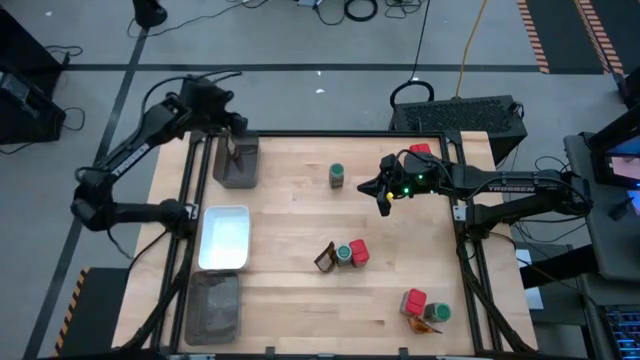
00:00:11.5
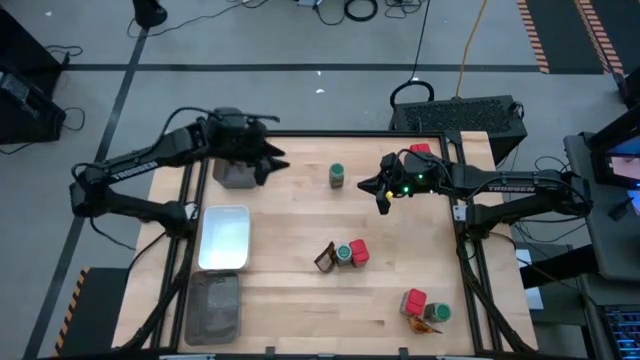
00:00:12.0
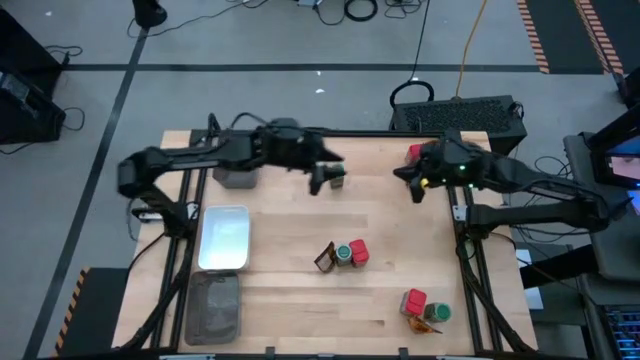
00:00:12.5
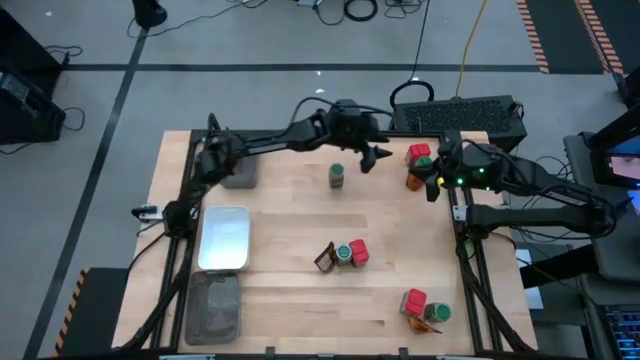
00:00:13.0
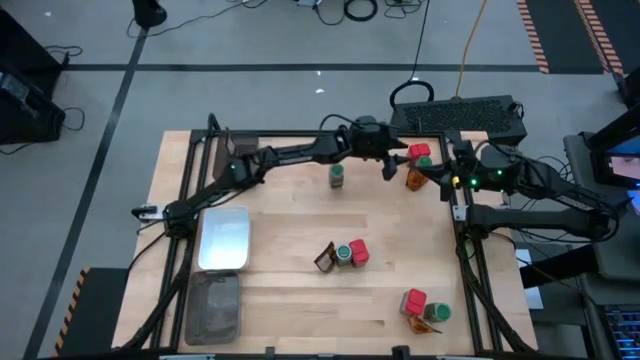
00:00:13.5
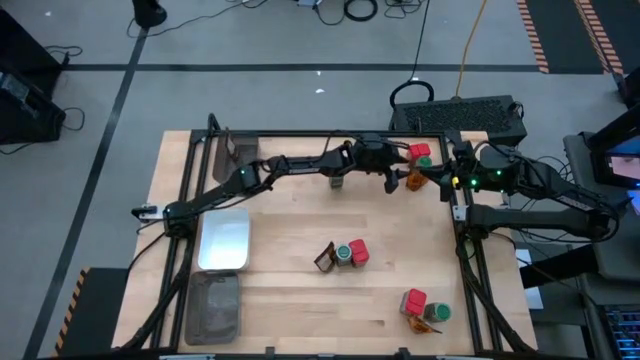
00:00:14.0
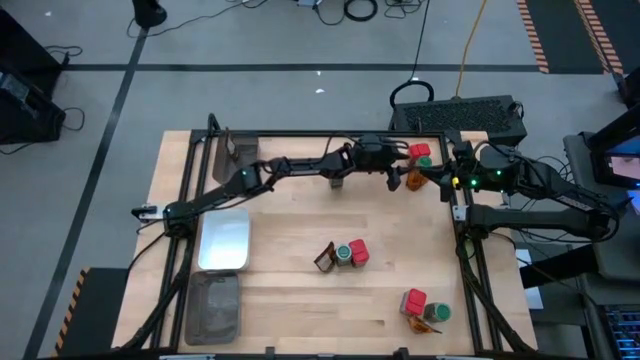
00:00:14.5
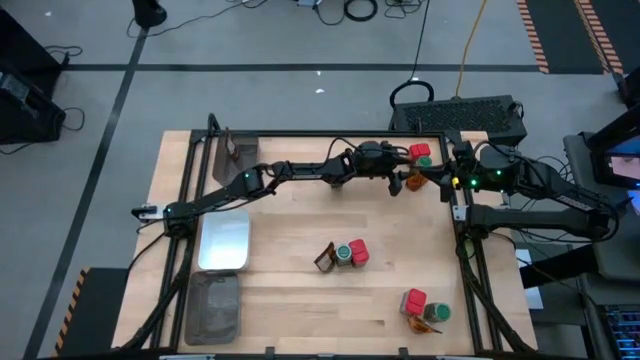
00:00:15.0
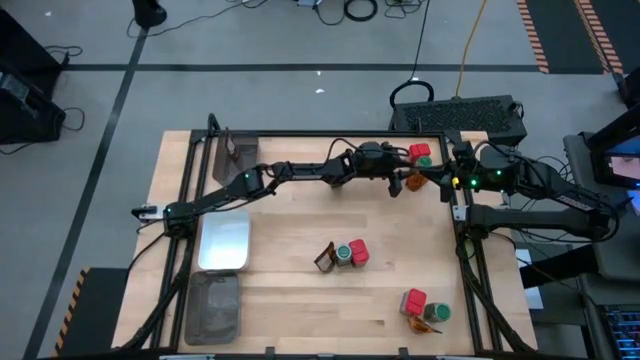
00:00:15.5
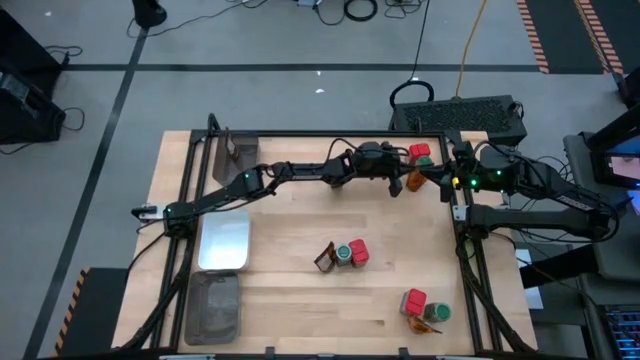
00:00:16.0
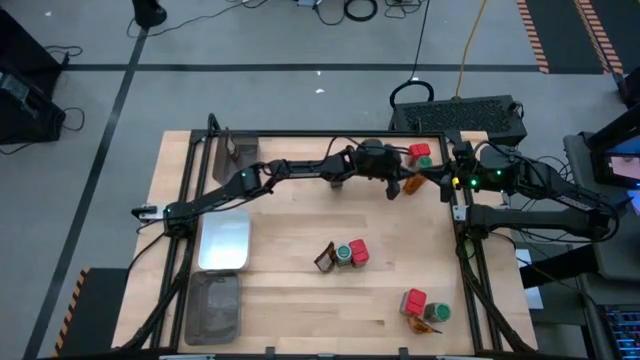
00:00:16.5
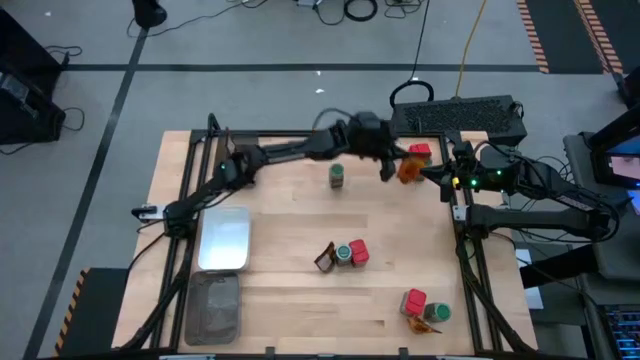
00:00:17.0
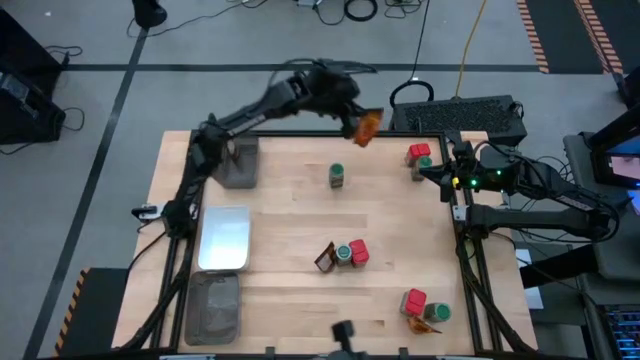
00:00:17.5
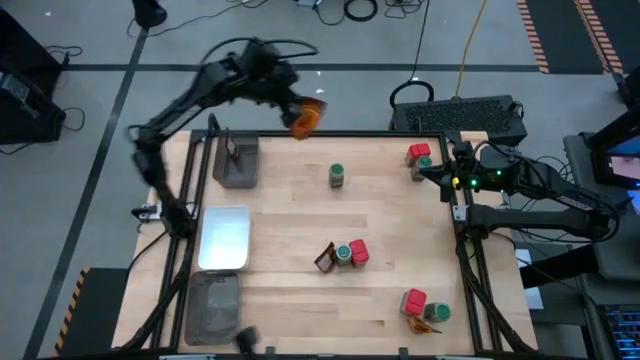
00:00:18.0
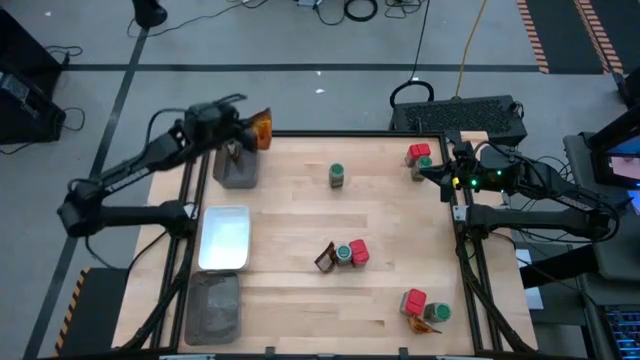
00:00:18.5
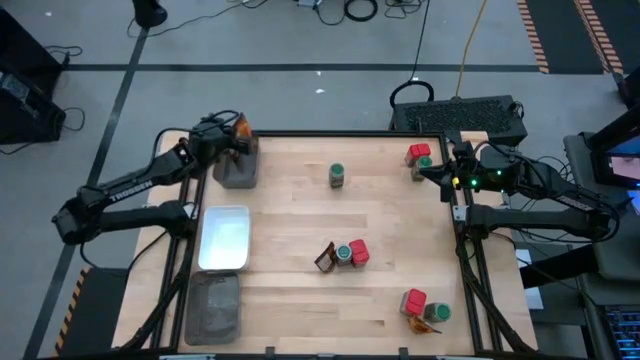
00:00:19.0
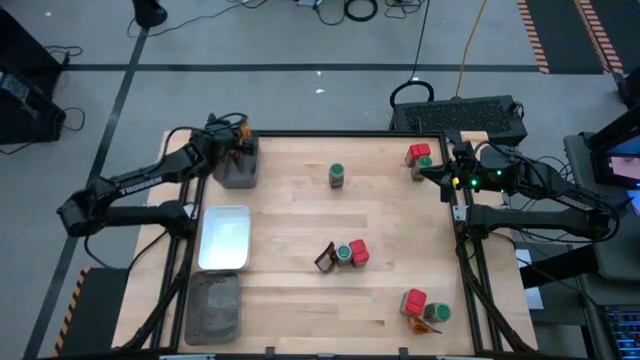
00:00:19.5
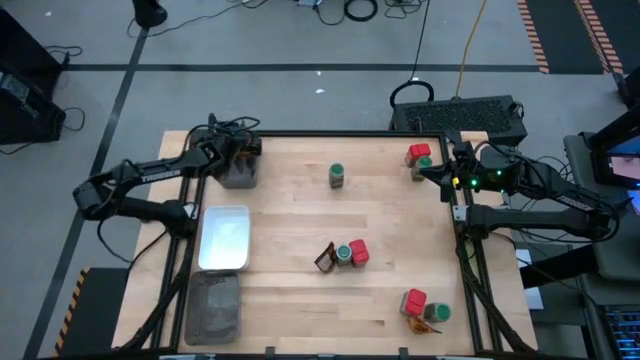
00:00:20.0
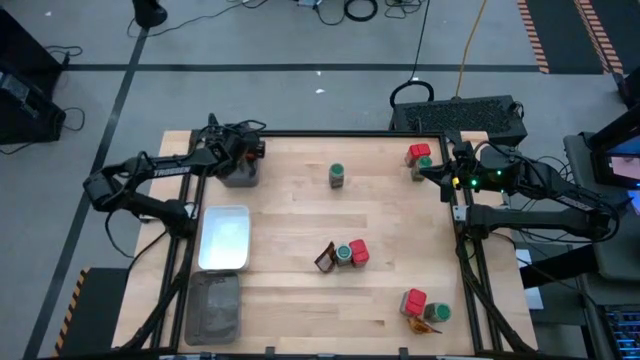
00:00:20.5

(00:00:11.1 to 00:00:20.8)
Task: Sort spices by type
Put the top orange seasoning pack into the top black bin

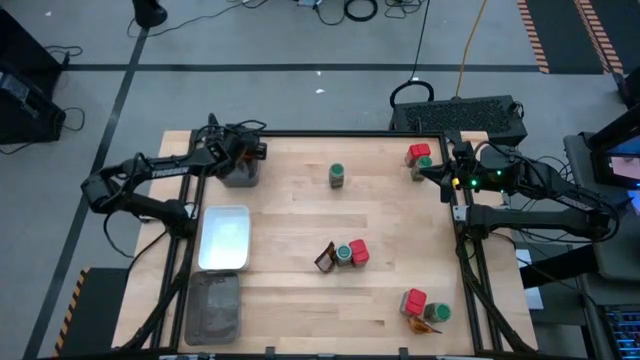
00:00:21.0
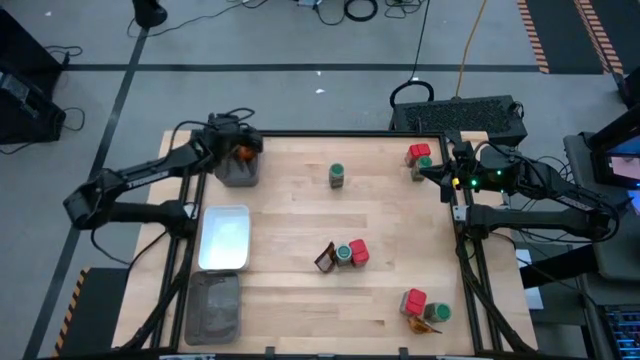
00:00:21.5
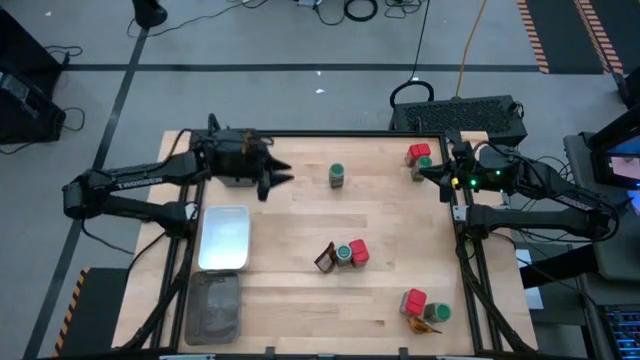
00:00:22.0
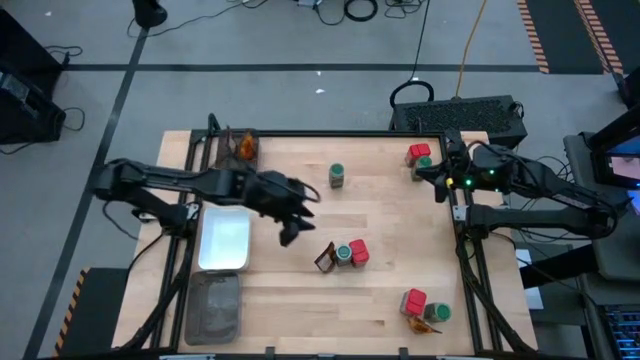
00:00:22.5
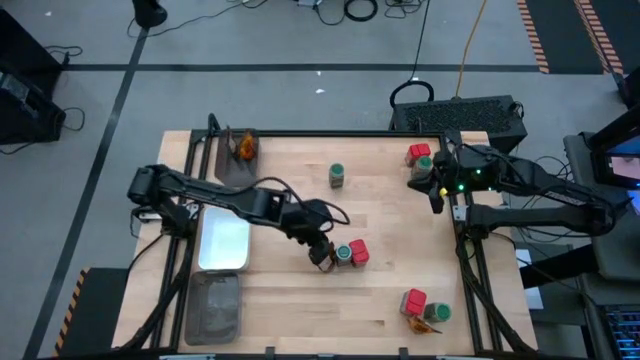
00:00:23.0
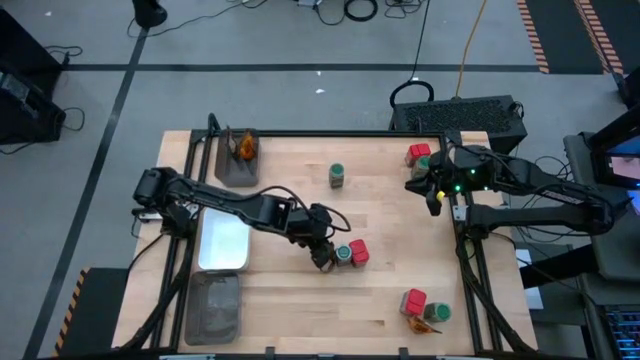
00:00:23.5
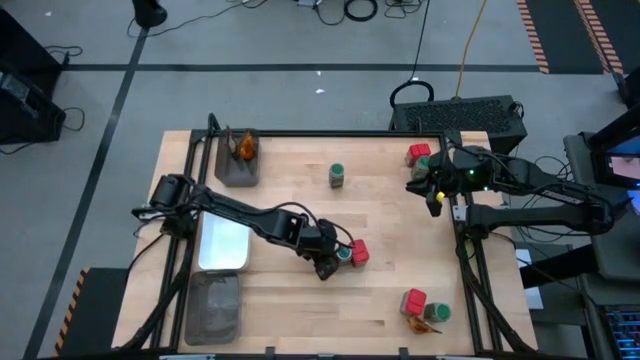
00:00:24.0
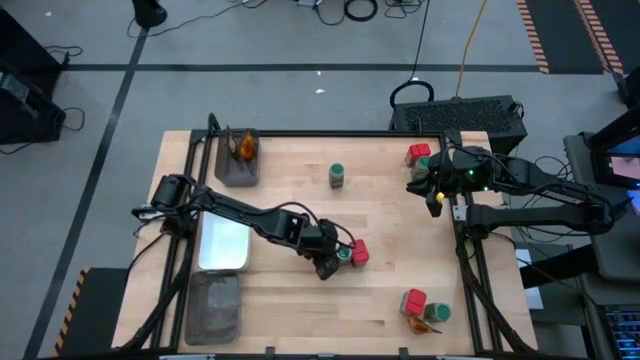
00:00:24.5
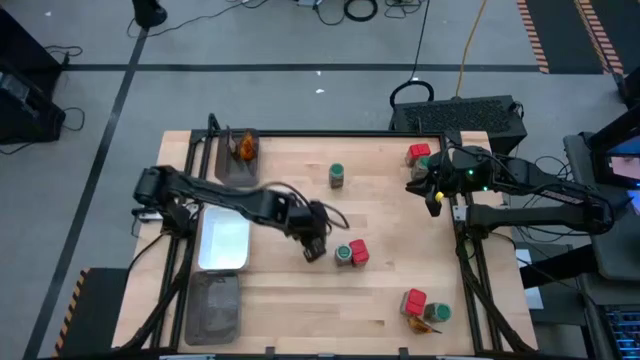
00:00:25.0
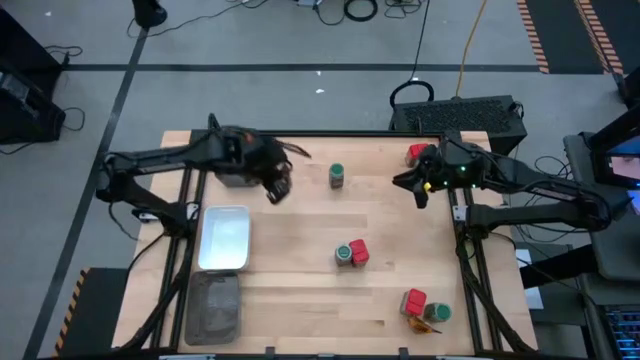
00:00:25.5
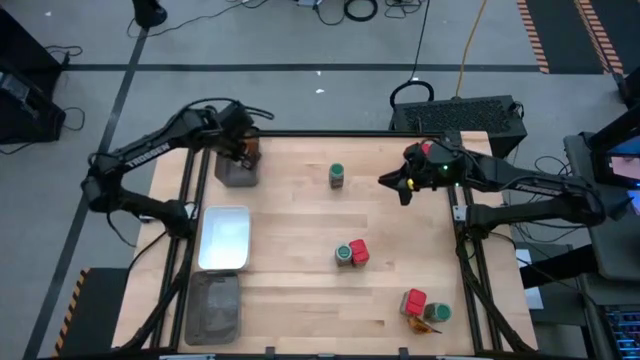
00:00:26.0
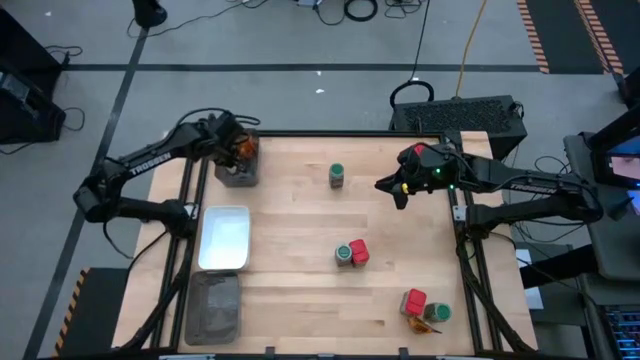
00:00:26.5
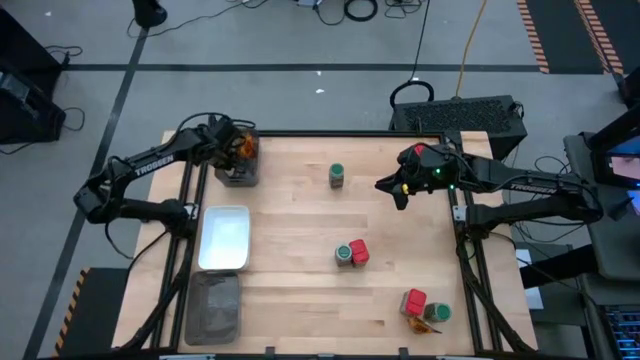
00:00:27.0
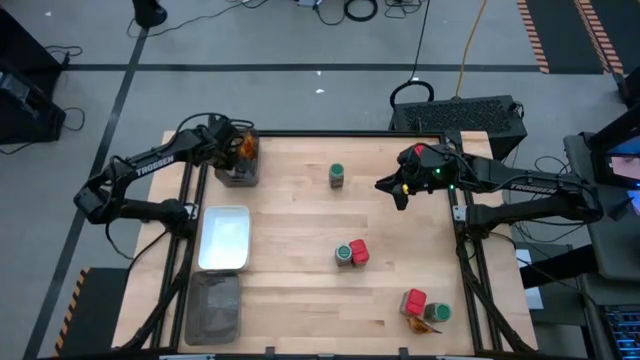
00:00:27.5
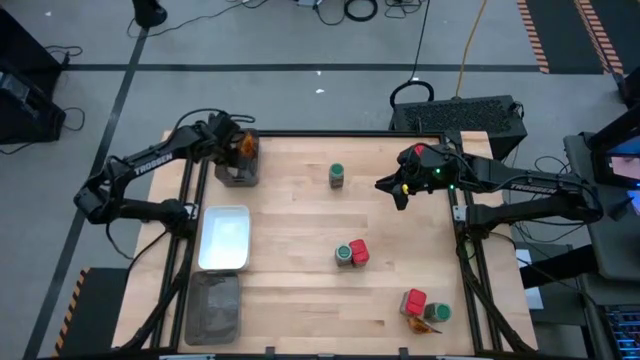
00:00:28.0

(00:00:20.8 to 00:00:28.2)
Put the left orange seasoning pack into the top black bin

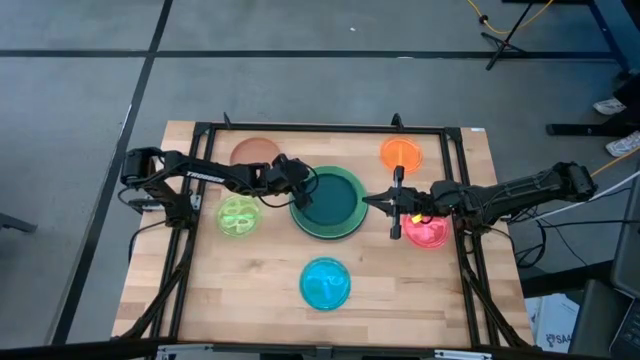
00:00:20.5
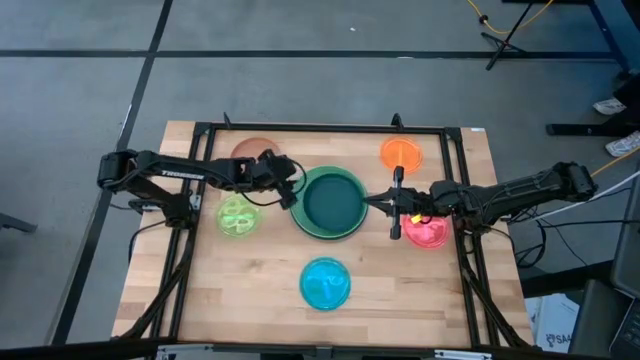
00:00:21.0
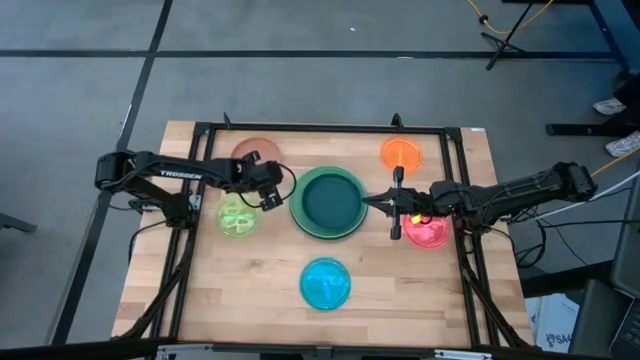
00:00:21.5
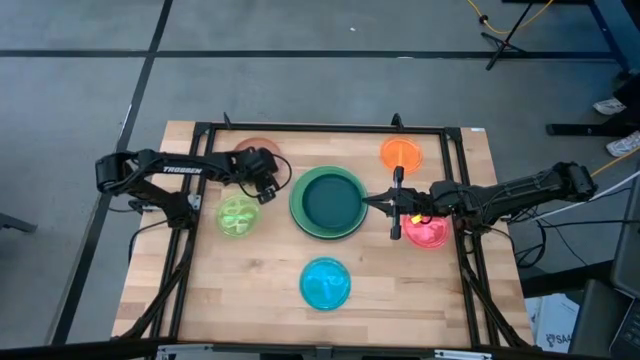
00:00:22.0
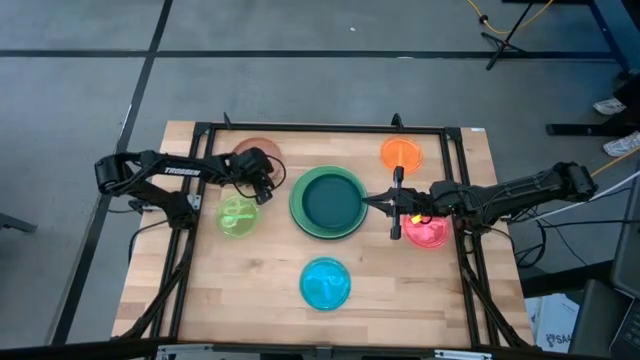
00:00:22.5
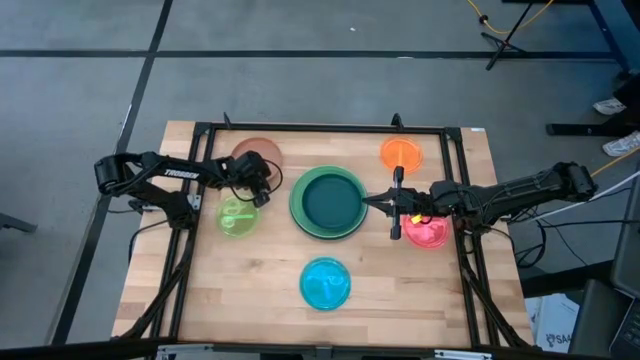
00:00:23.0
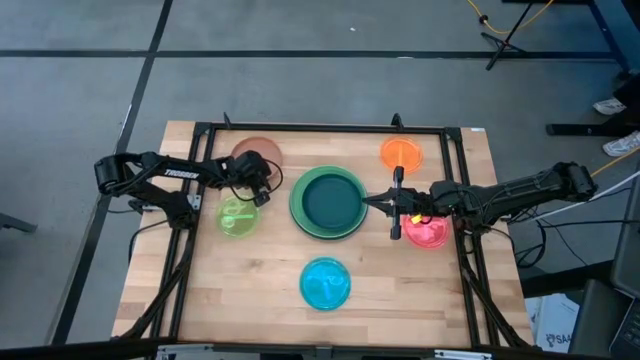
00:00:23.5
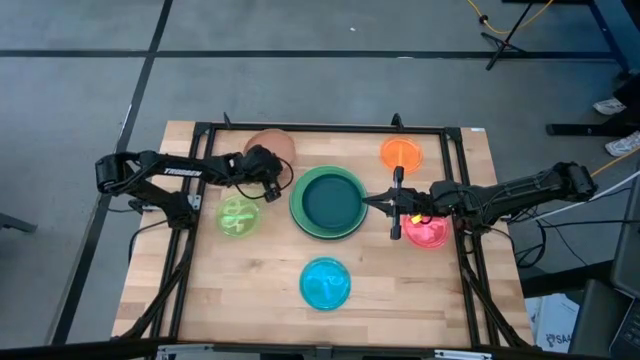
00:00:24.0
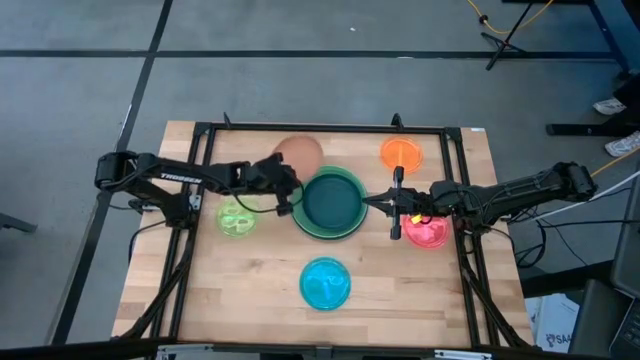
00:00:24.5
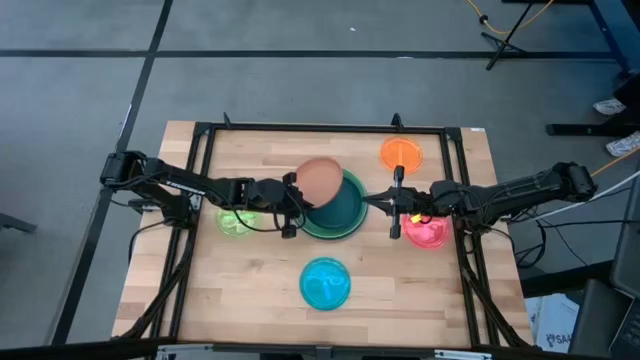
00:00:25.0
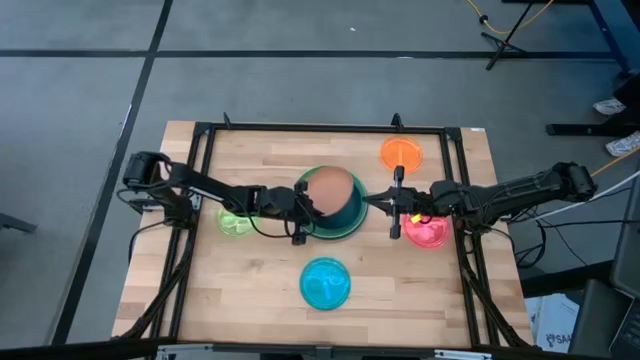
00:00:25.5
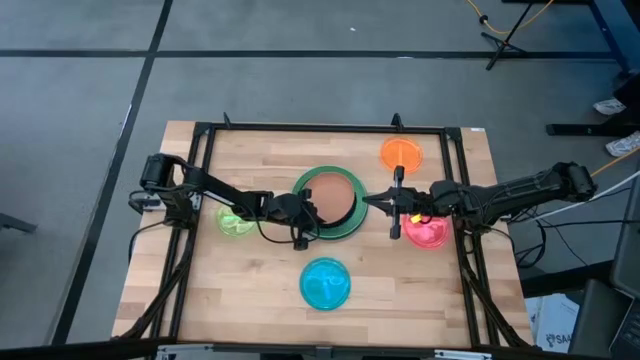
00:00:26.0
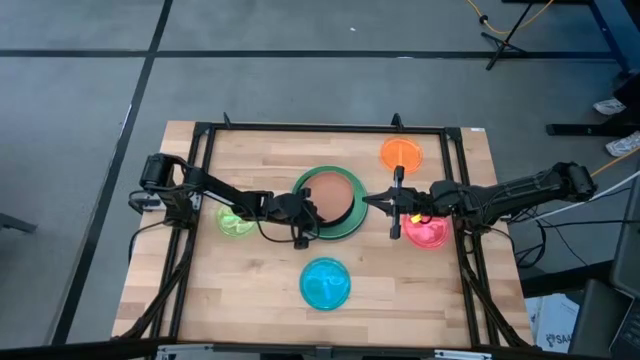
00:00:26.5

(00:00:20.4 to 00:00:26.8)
Task: Stack plastic plates
Stack the brown plate on top of the dark blue plate
